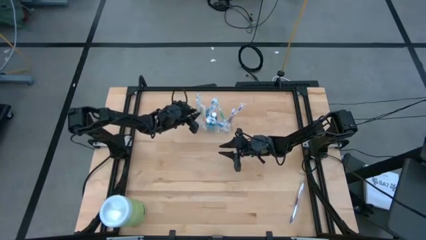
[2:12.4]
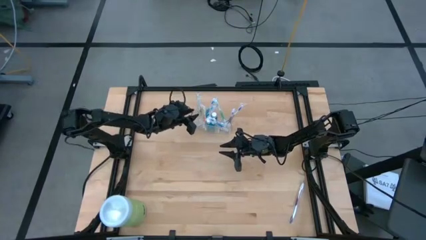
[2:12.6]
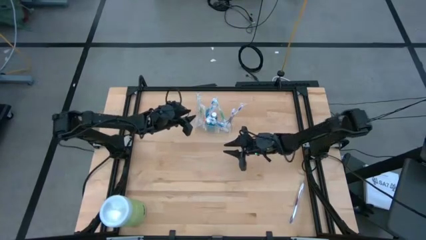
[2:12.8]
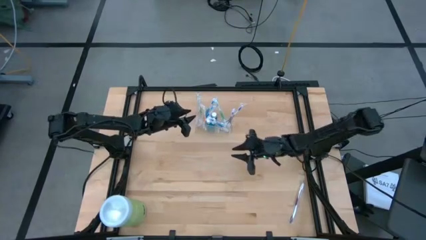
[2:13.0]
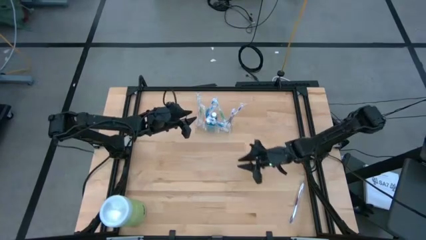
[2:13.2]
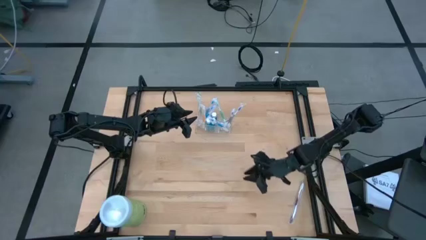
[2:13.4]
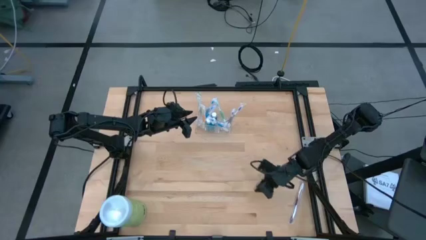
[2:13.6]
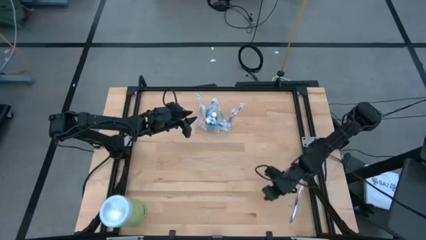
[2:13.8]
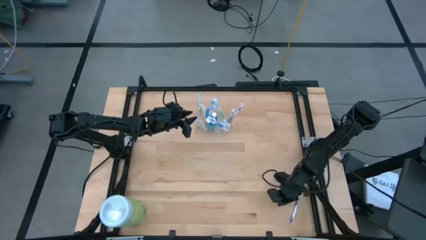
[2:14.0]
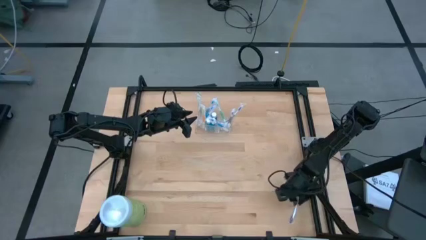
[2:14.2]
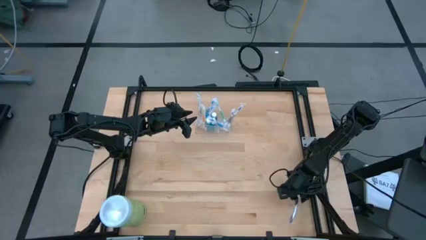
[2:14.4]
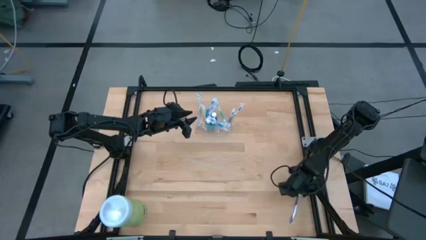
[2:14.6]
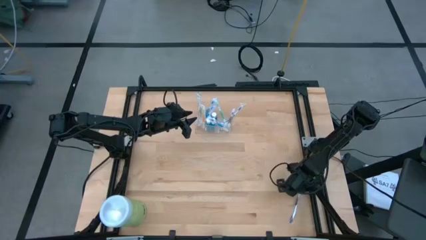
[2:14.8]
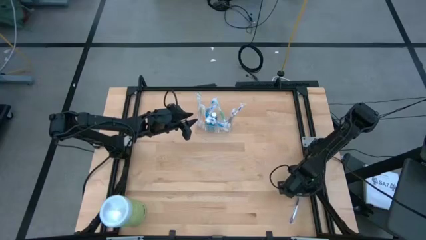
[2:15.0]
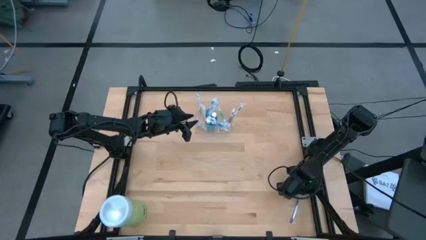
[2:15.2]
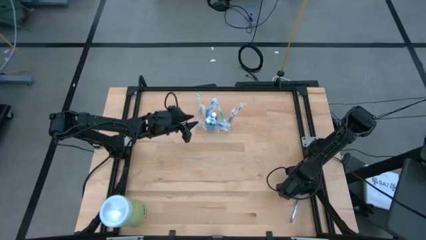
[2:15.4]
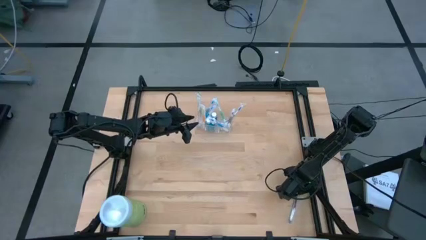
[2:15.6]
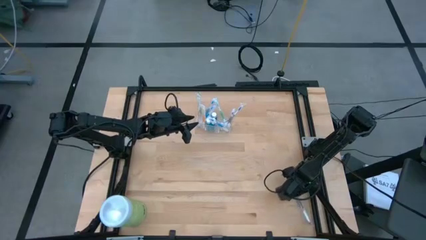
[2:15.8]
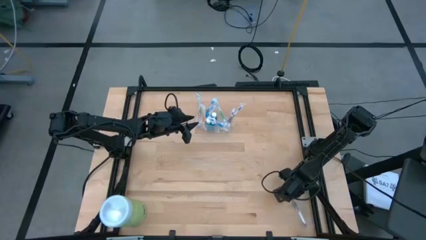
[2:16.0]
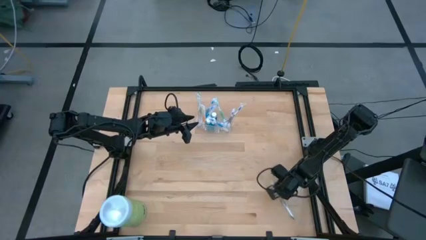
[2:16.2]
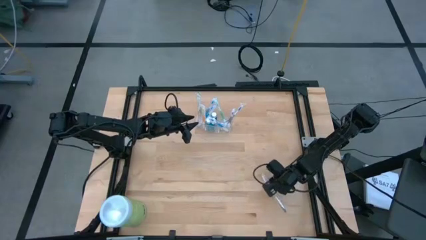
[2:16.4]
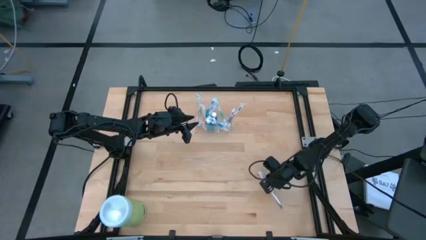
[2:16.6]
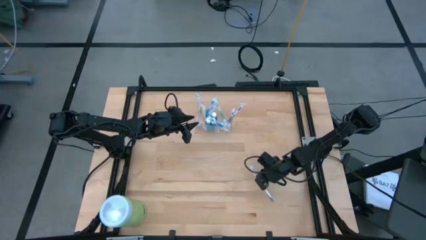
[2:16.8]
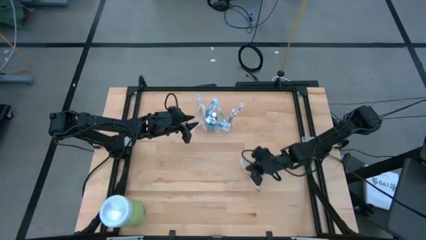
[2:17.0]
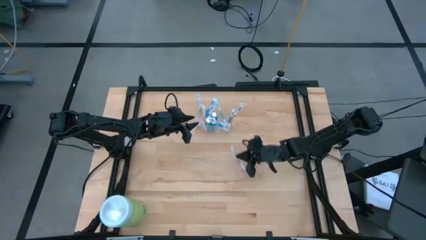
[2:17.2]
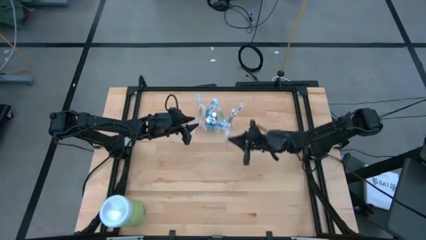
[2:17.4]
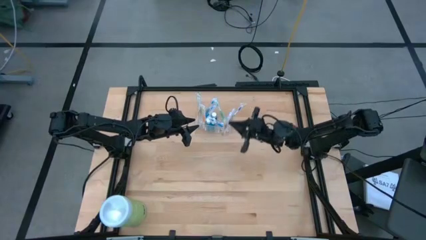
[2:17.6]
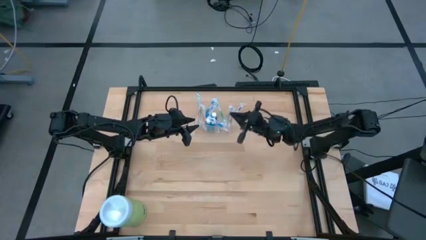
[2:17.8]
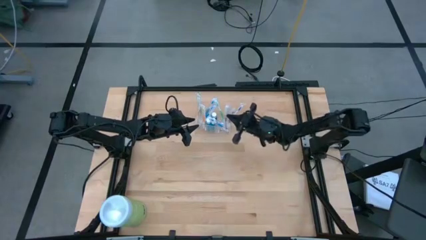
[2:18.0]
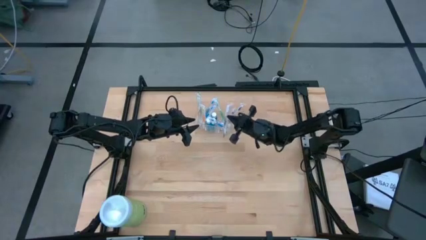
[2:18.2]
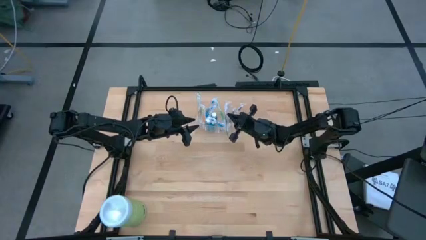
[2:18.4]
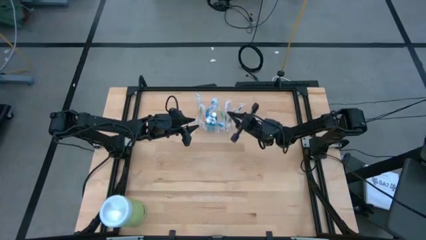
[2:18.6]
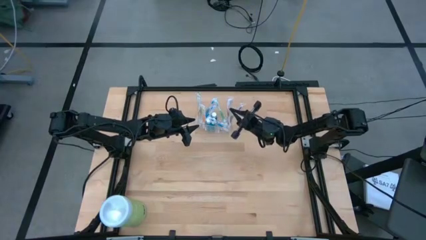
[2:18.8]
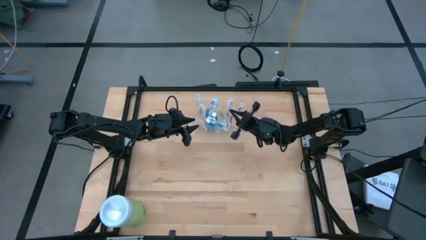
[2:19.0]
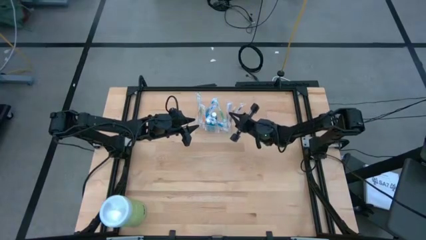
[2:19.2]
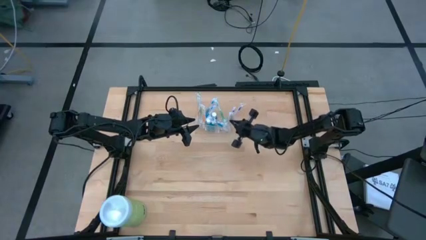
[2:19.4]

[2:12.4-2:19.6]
Task: Pick & Place toothbrushing station
Put the purple toothbrush into the transparent organizer

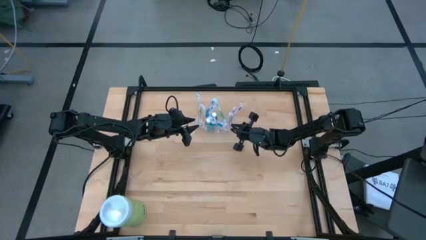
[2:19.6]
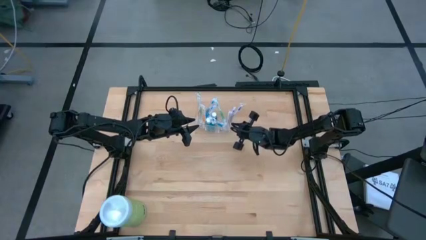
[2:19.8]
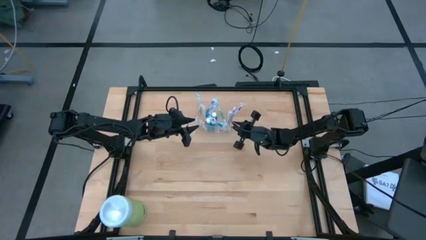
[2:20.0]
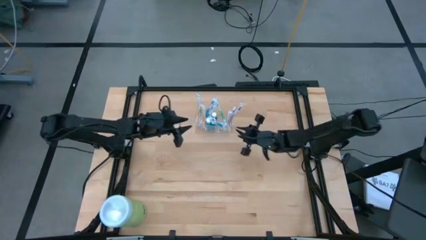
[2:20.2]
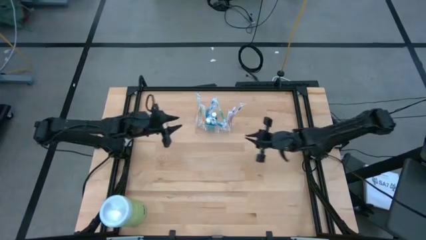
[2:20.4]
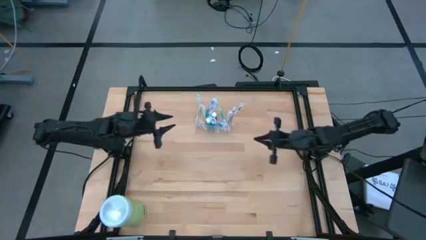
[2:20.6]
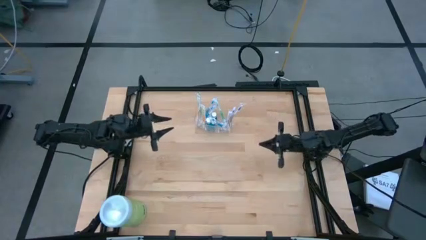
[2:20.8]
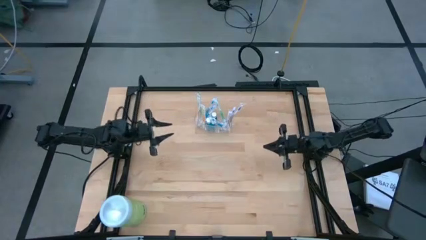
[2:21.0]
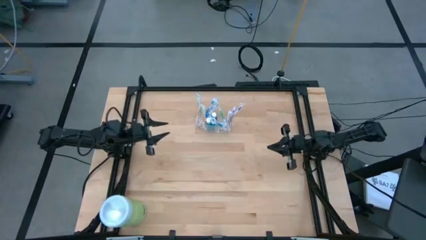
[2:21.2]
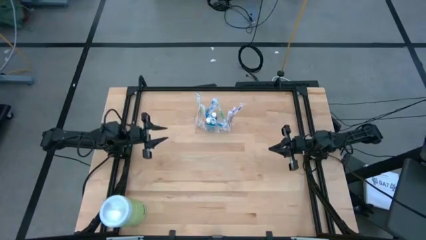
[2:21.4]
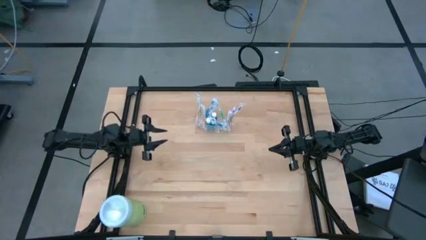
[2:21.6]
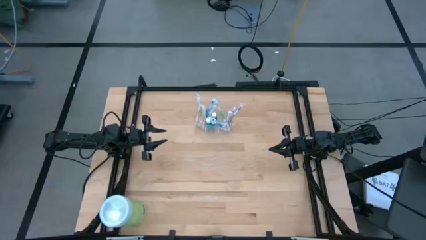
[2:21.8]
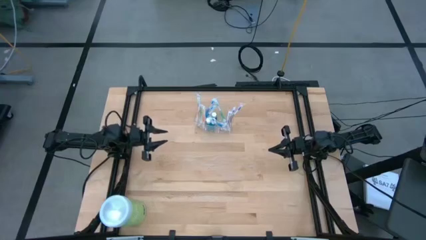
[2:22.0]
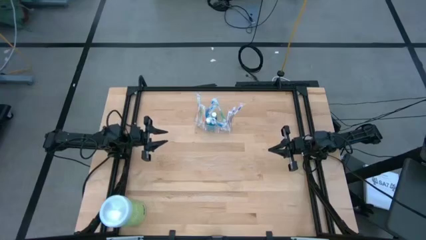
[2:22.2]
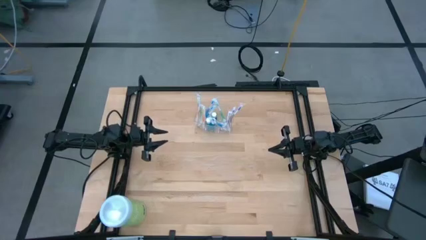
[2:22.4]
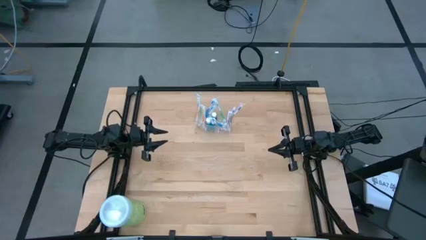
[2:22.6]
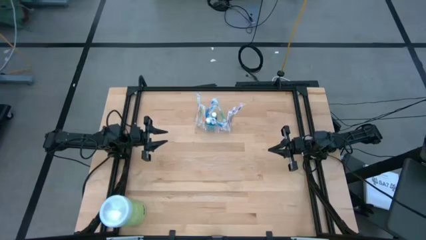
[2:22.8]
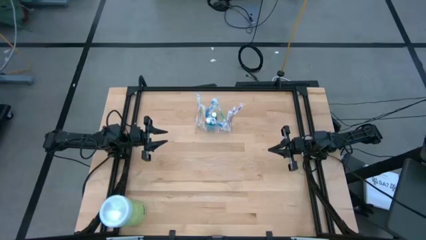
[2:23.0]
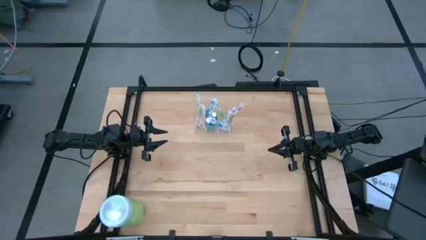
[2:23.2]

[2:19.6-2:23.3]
Return to Home Position

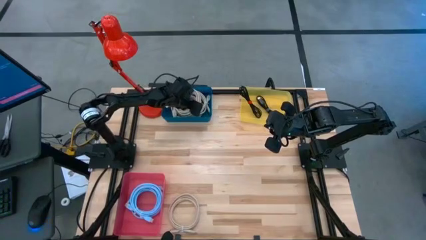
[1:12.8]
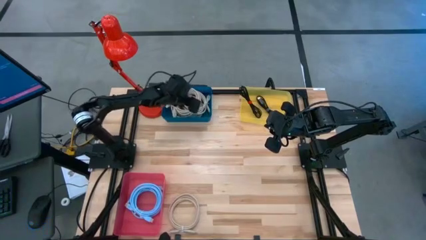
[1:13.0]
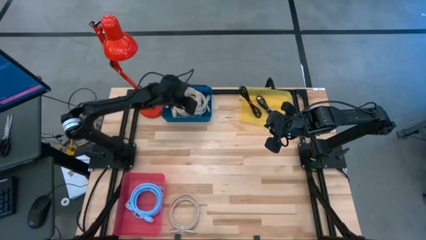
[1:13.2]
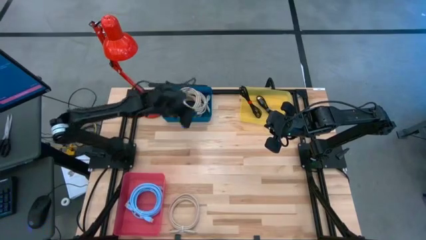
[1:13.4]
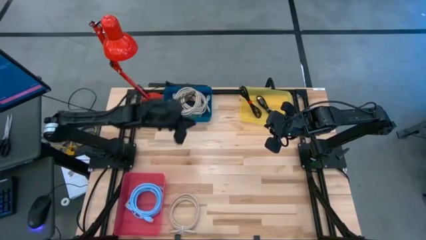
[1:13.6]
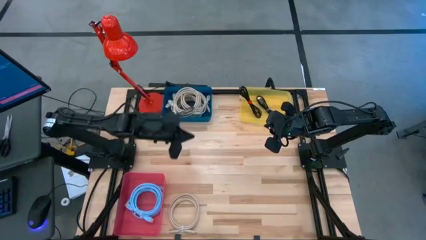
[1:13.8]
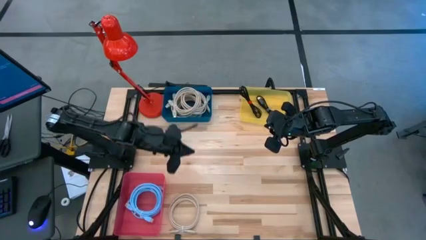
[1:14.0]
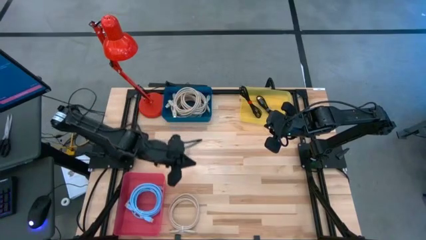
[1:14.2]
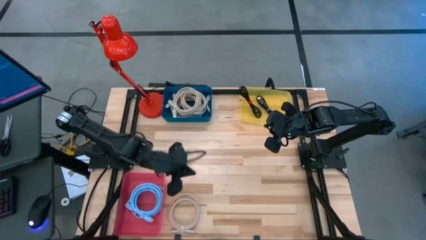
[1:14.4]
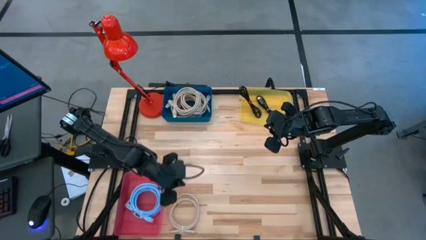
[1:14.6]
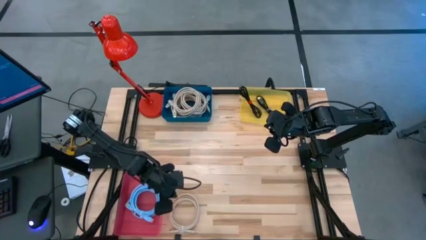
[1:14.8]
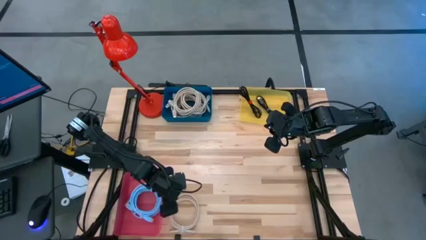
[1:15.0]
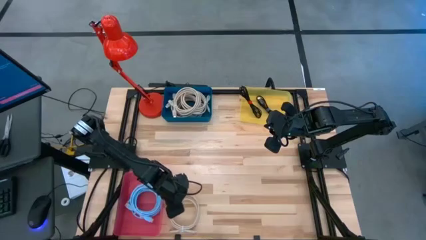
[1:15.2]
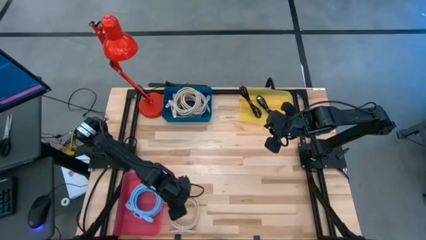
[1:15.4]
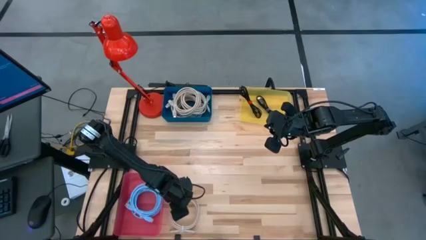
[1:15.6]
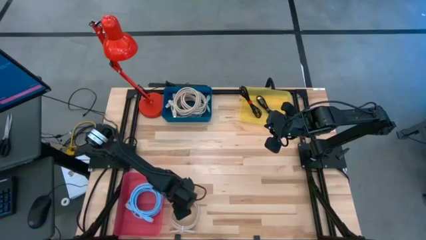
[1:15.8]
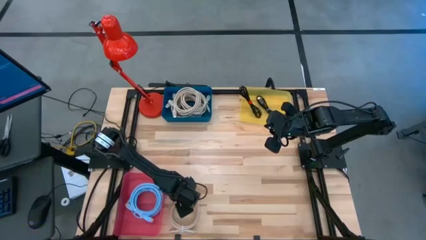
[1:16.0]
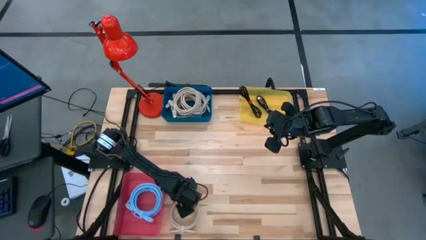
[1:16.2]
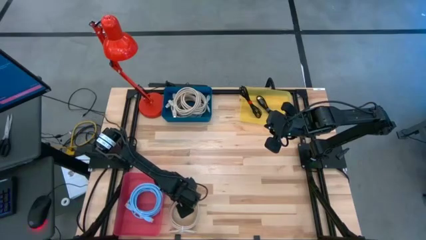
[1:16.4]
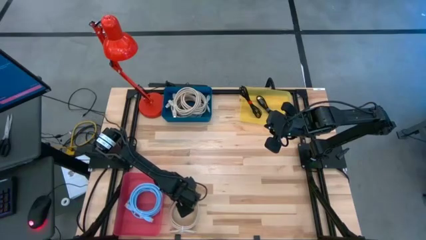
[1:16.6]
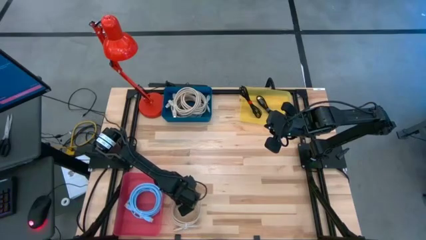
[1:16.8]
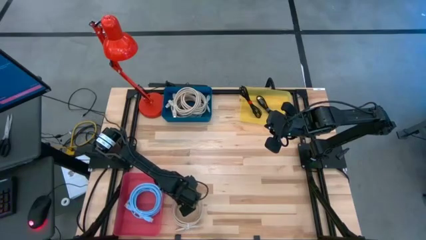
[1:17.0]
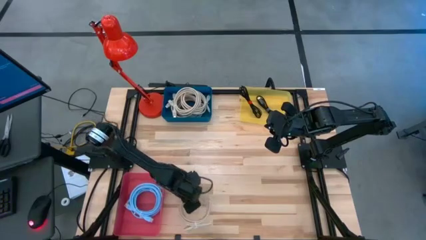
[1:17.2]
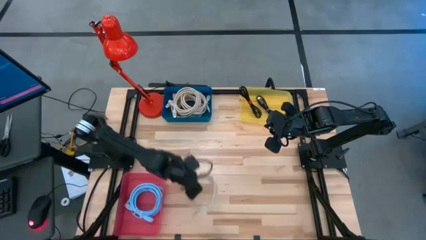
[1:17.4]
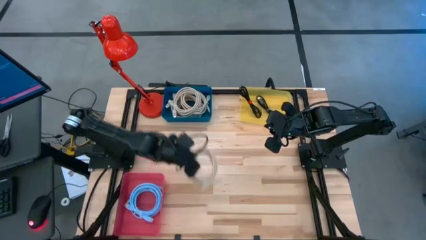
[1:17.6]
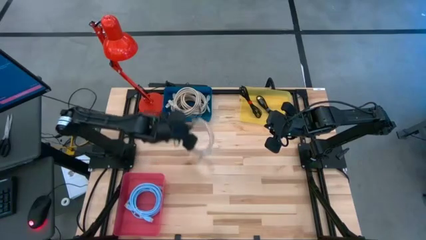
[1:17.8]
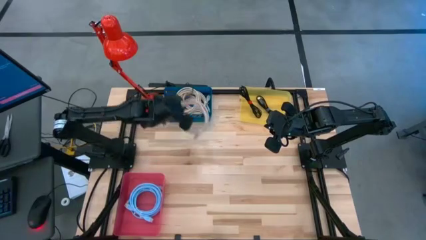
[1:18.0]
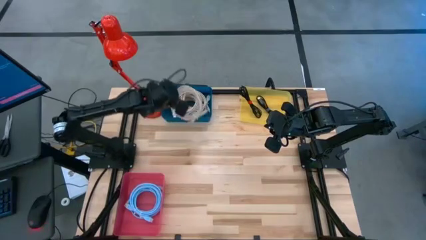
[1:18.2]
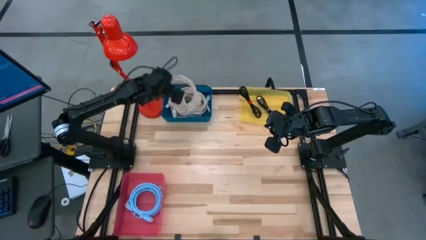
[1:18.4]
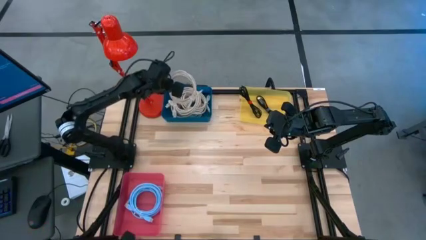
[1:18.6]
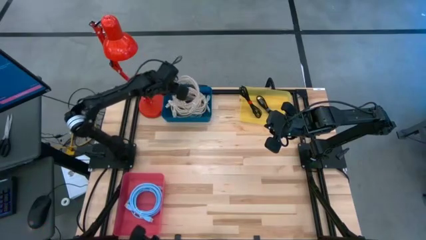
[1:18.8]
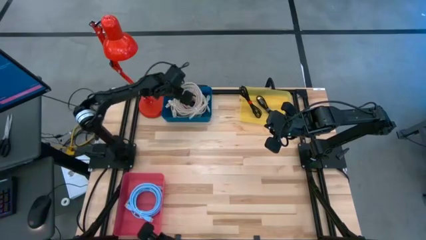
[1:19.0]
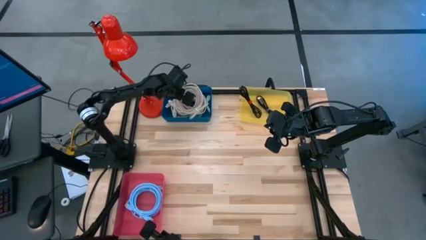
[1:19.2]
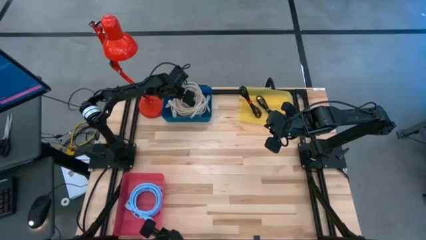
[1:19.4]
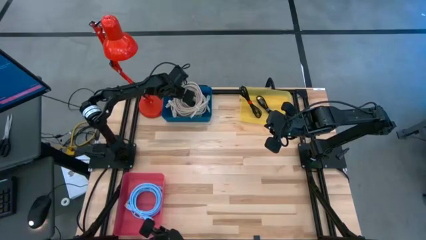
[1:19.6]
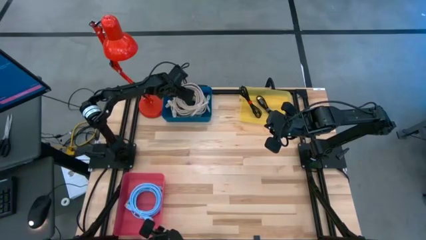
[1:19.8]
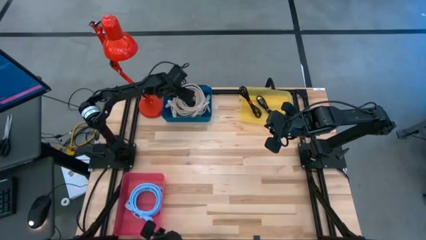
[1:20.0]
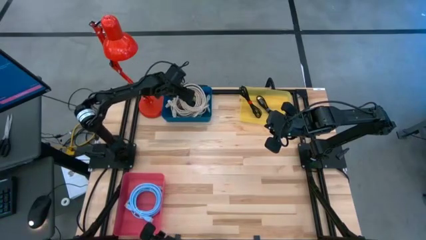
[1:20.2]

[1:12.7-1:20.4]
Task: Pick & Place USB Port
Put the brown display cable into the blue bin
